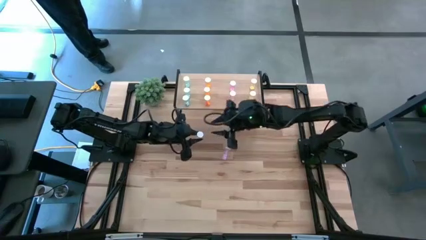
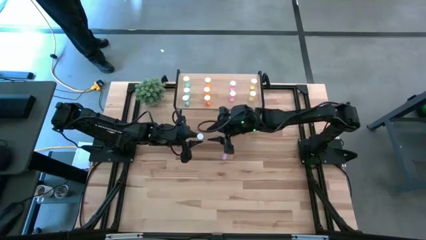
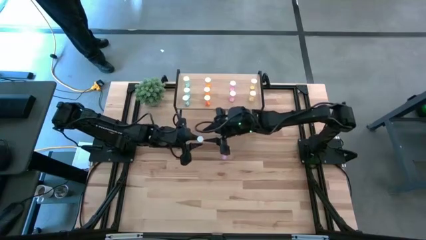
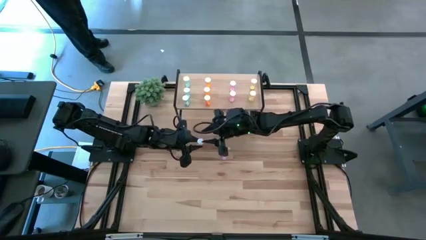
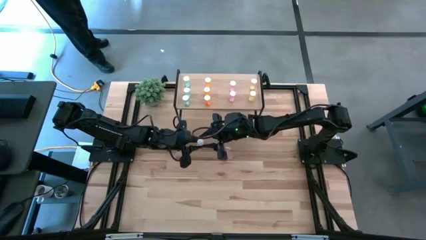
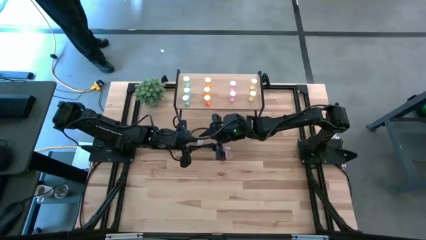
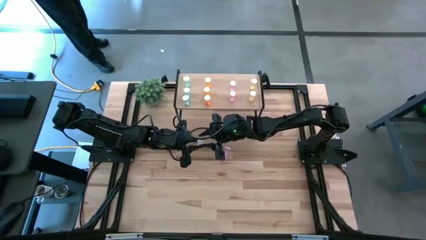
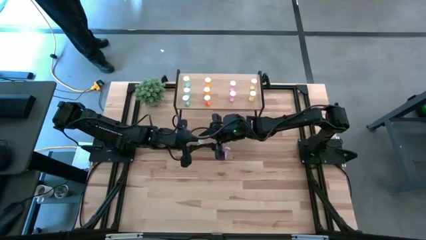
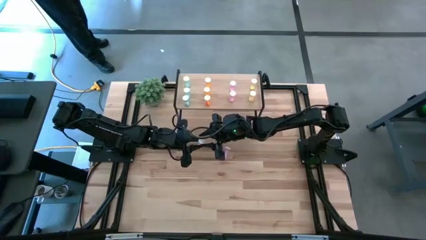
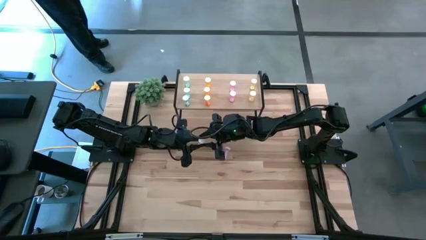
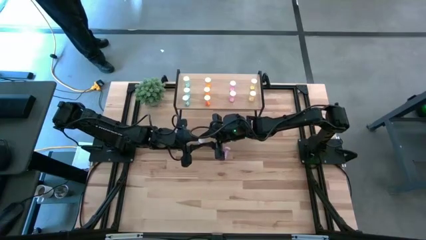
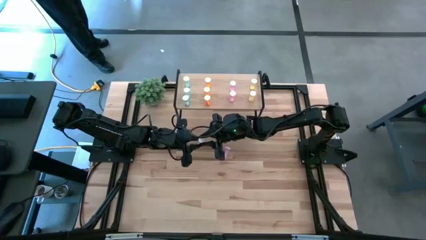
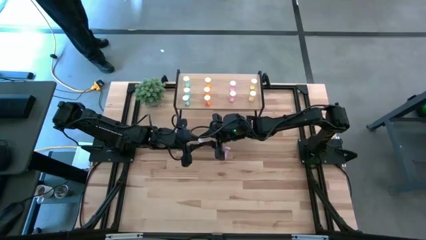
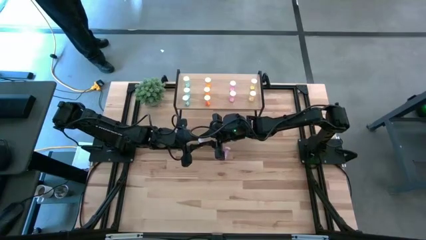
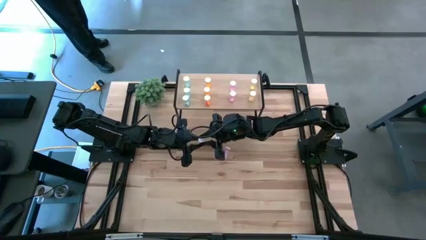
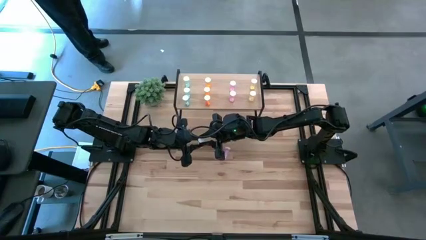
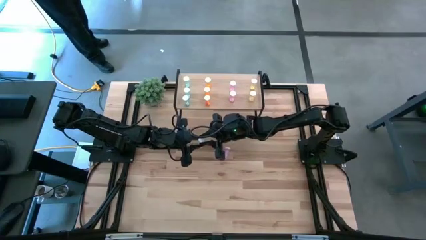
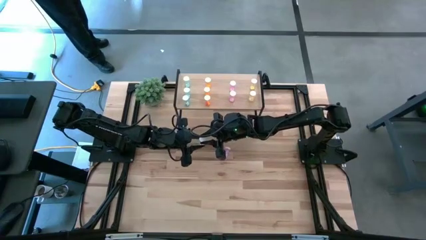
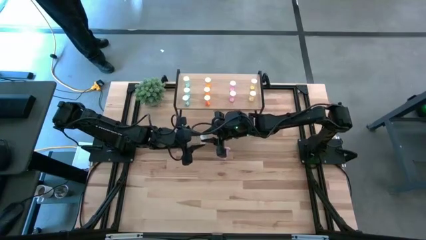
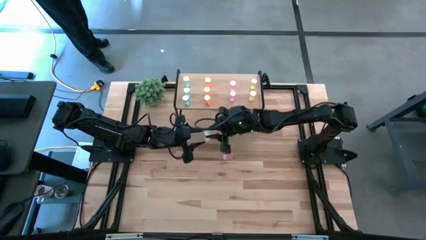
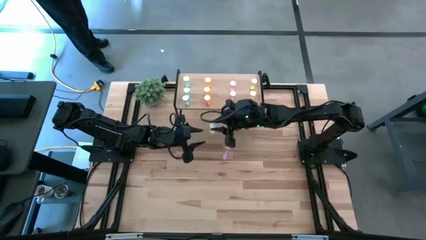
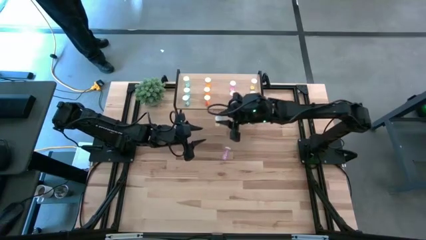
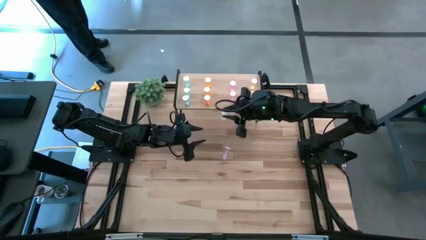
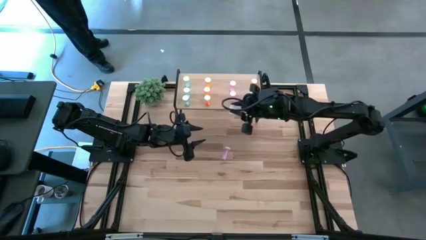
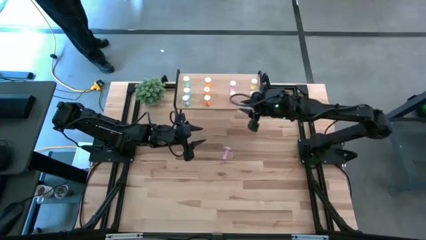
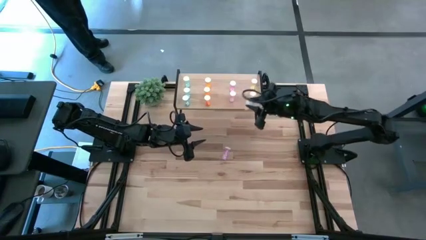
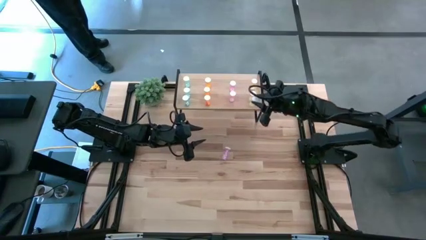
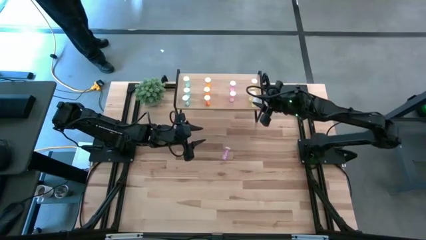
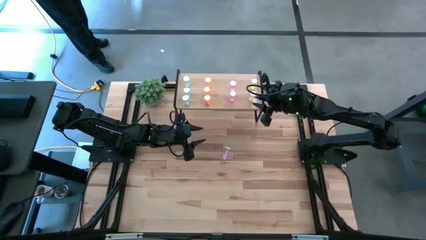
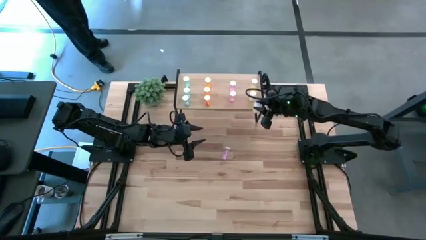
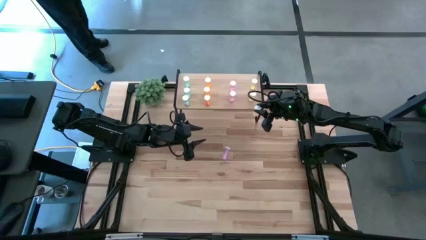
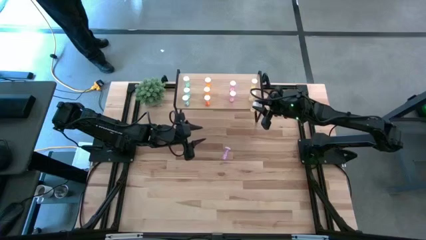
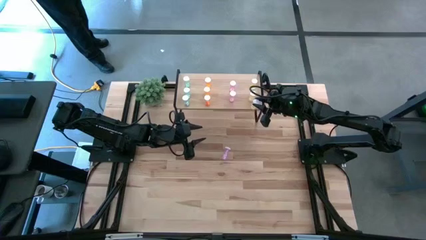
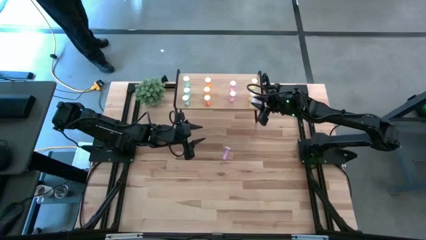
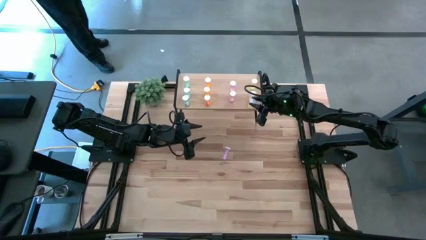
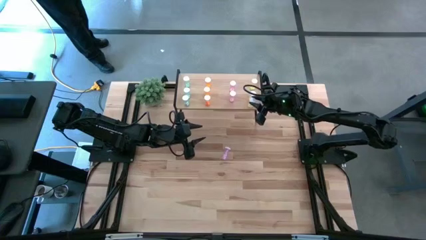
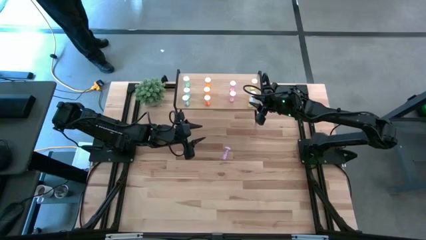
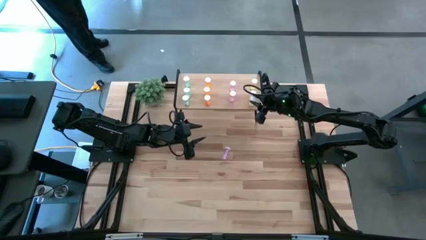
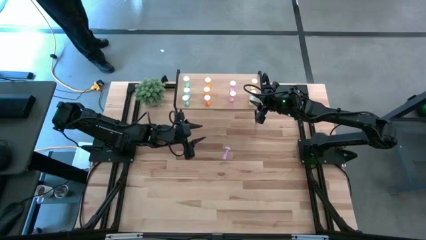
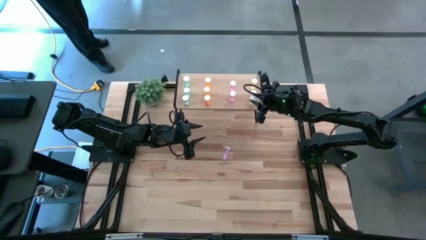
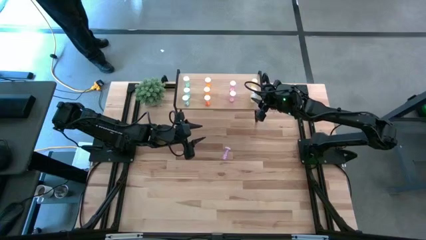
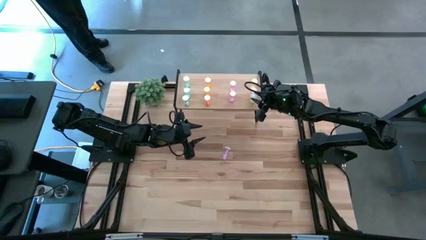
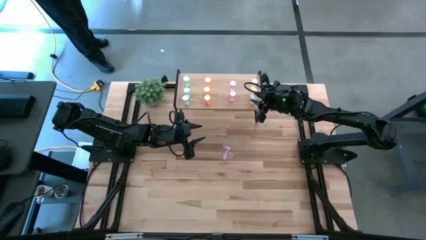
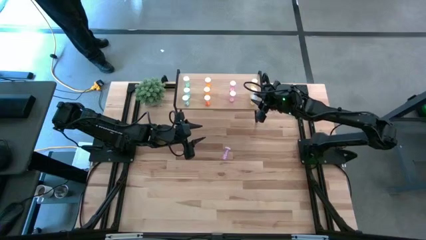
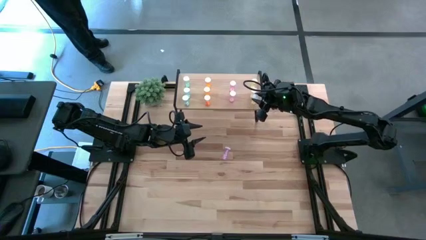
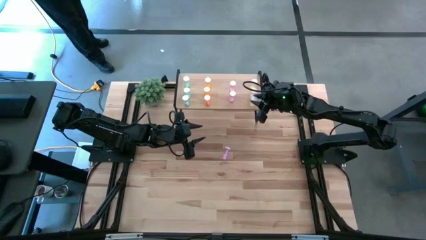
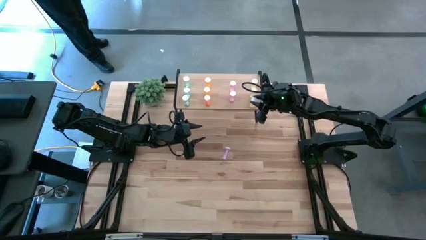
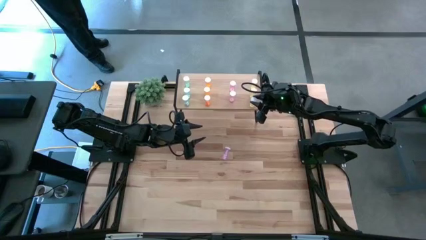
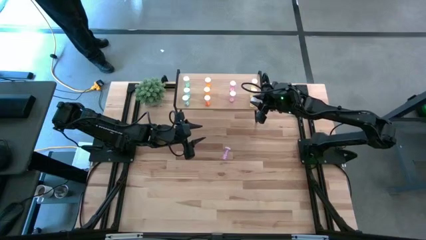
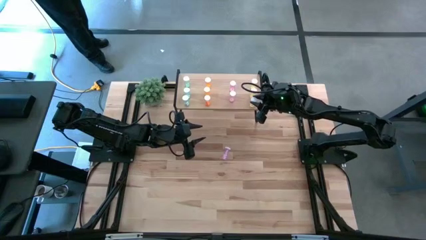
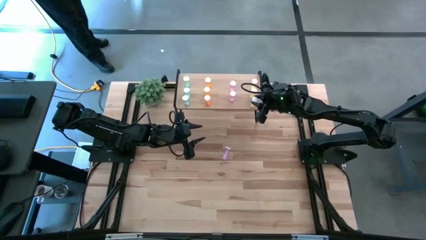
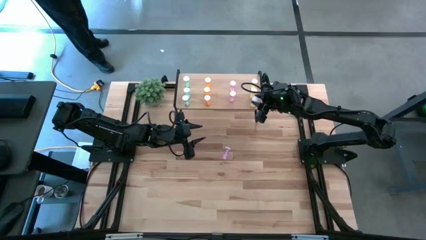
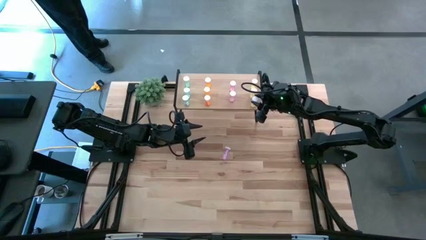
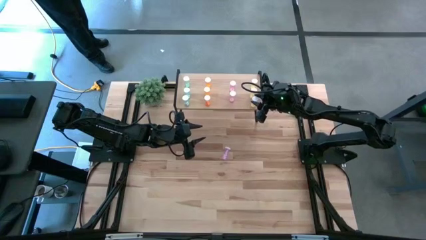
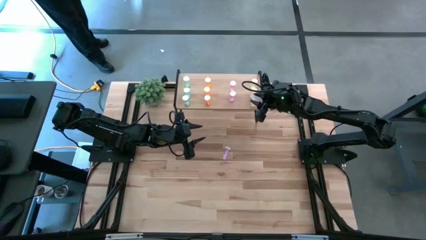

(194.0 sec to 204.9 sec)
Task: Pick and place medicine bottles onto shelf by color
Put the yellow pill bottle on the shelf aligned with the yellow pill bottle

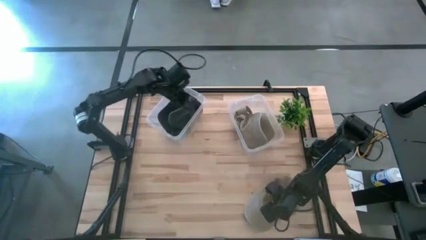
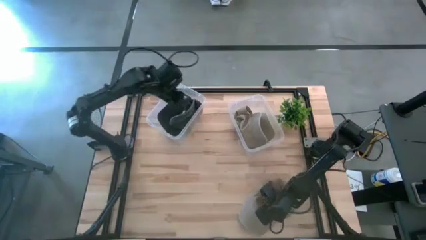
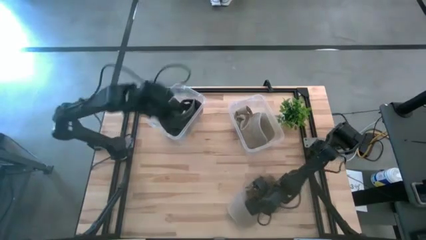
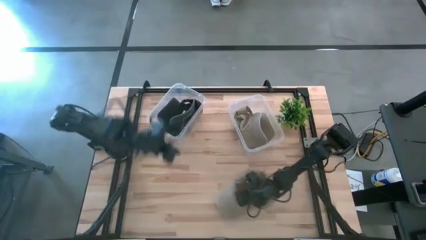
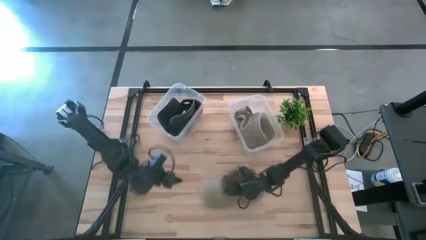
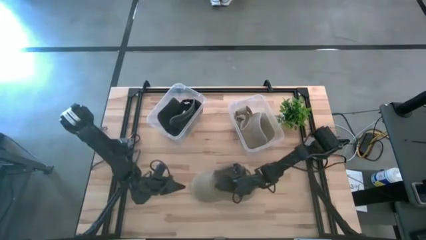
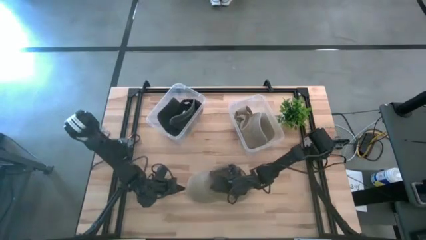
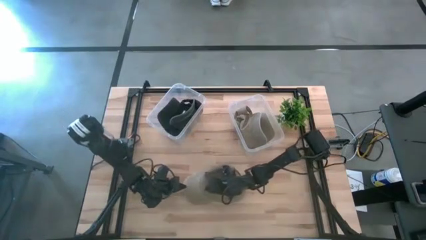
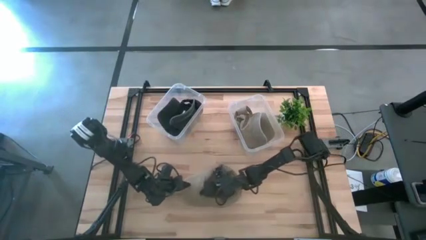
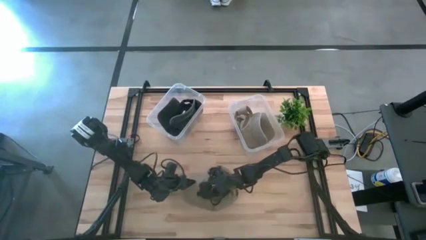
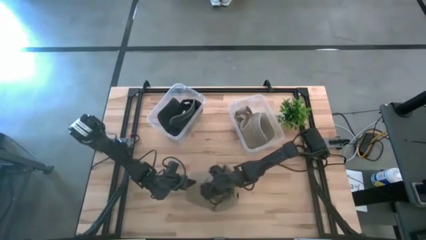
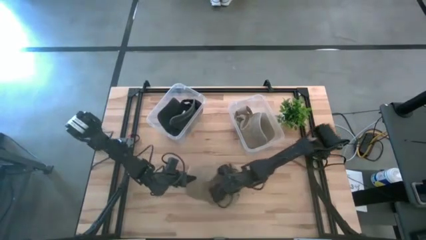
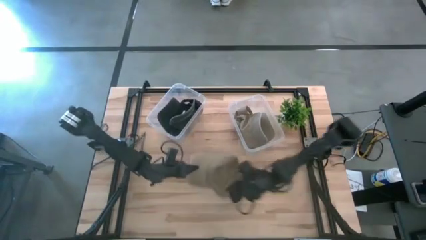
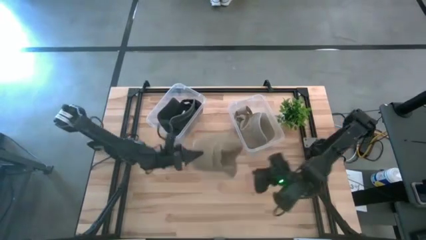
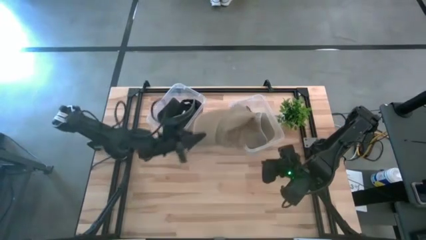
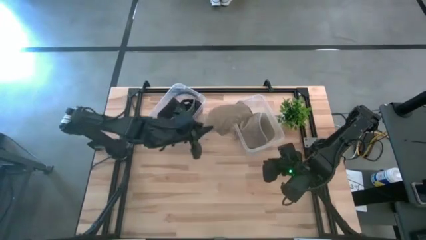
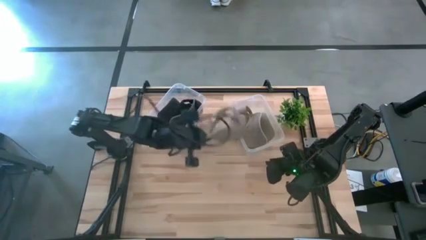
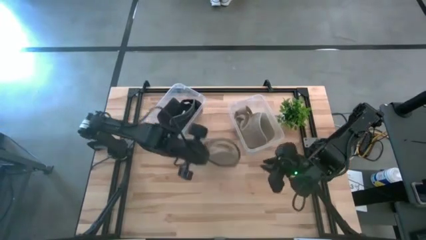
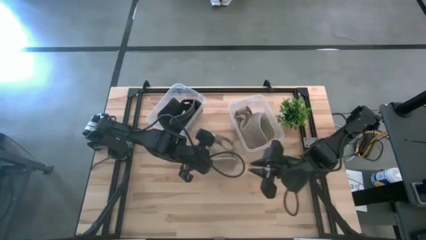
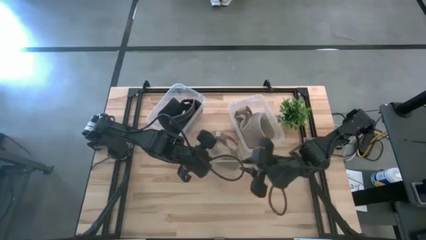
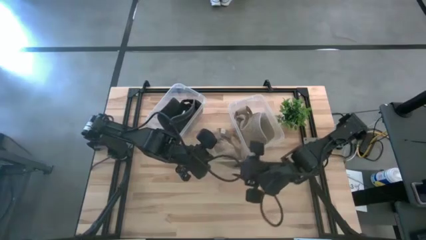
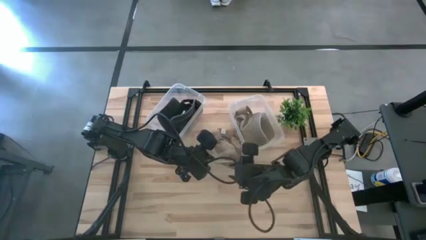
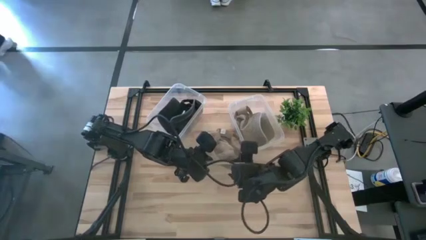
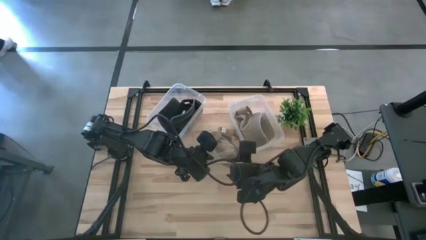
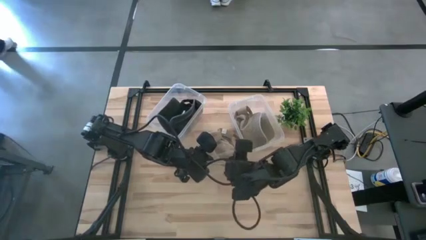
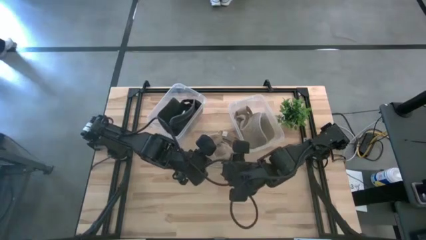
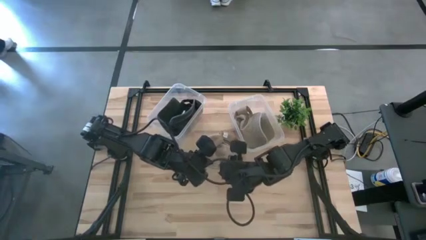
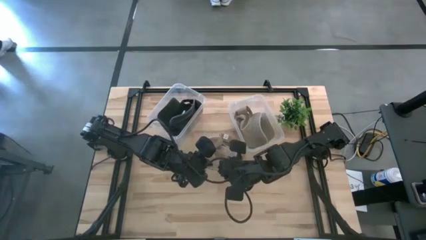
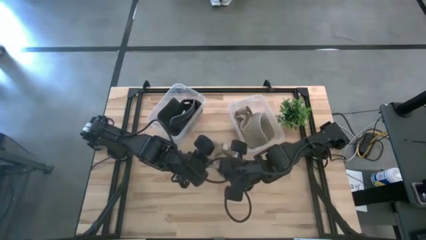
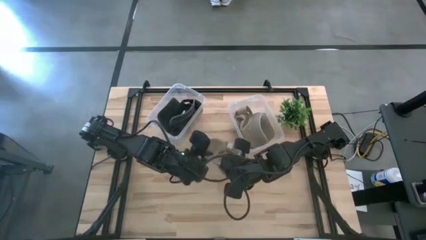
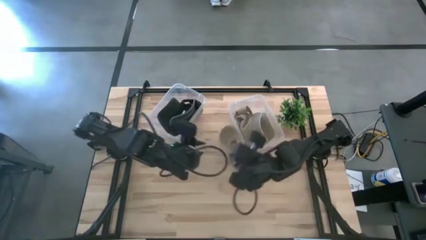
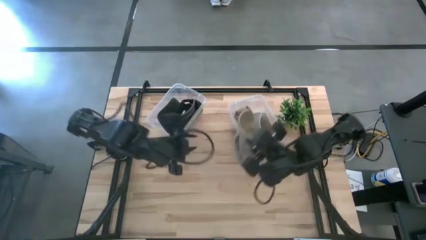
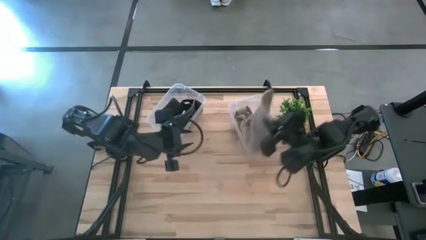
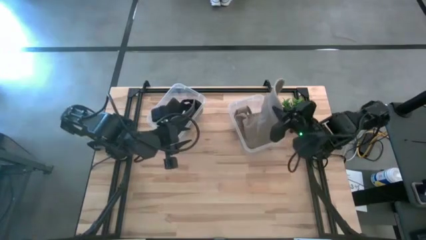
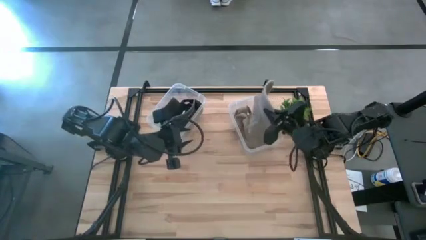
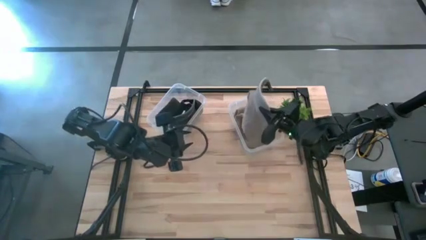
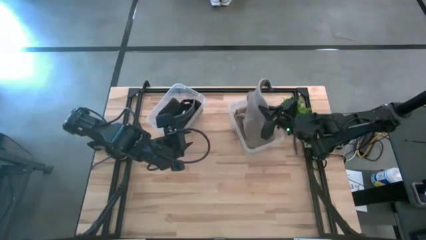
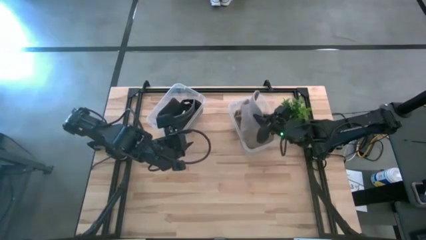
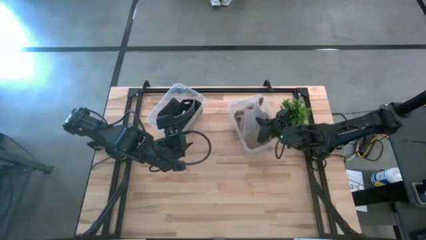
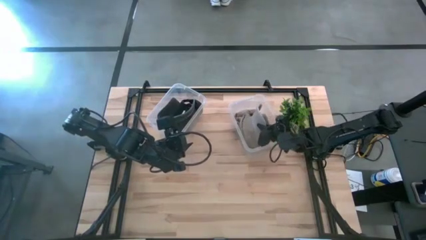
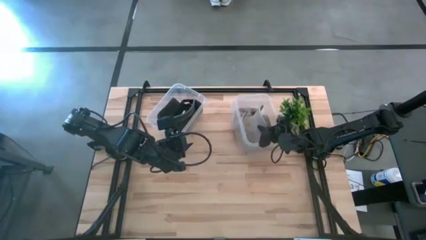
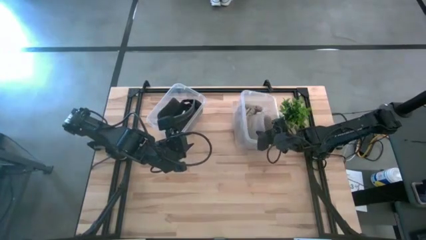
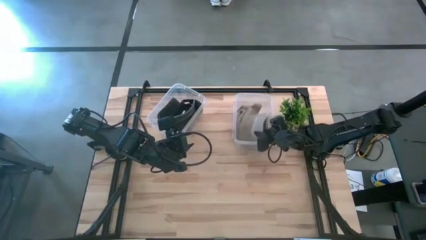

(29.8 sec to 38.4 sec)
Task: Pick & Place hat
Put the brown cap into the right transparent bin
